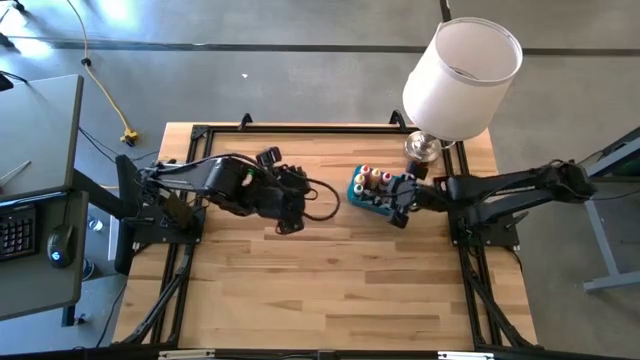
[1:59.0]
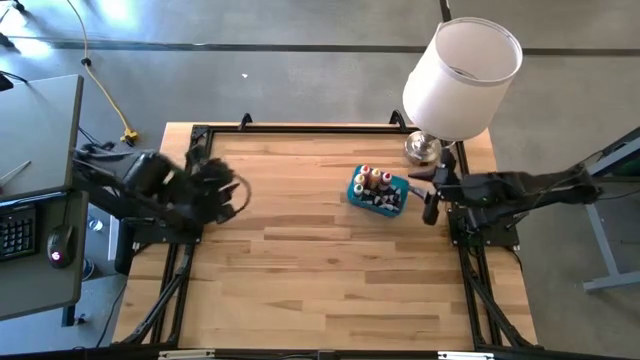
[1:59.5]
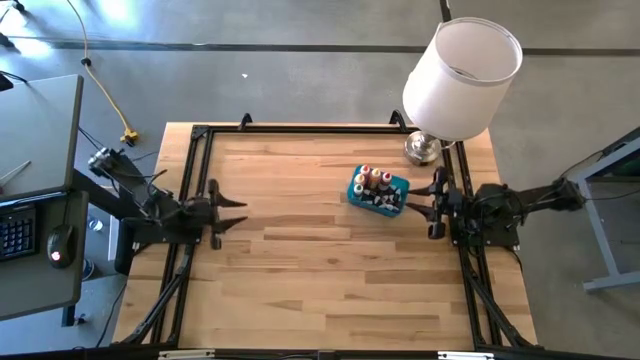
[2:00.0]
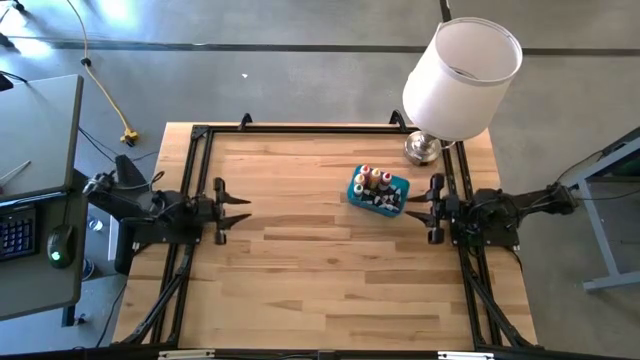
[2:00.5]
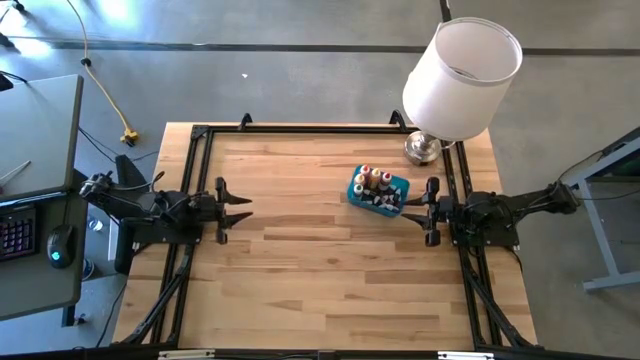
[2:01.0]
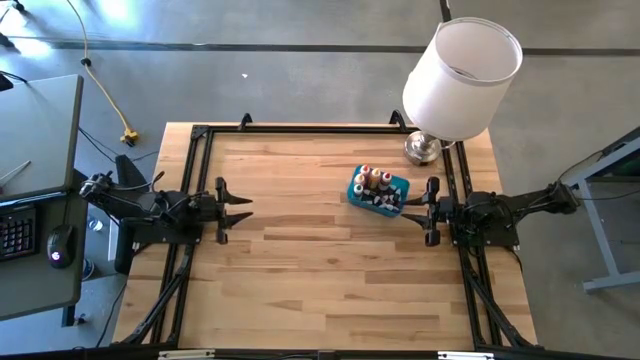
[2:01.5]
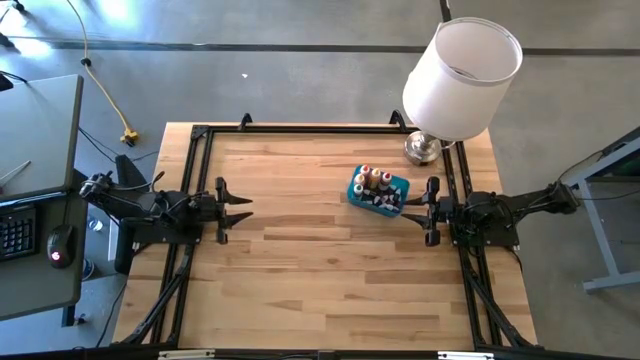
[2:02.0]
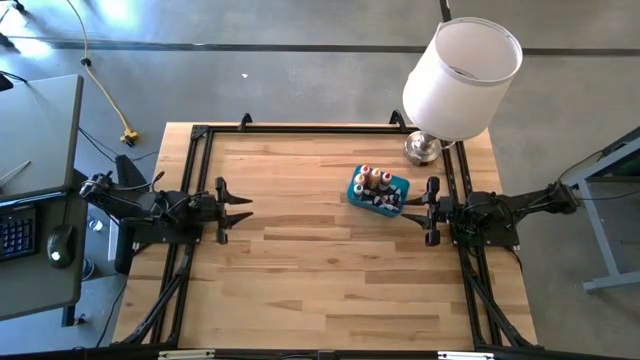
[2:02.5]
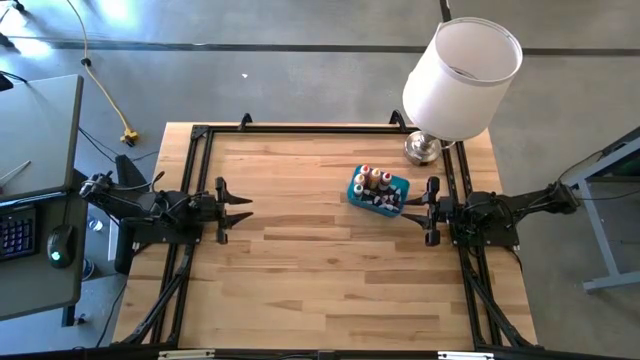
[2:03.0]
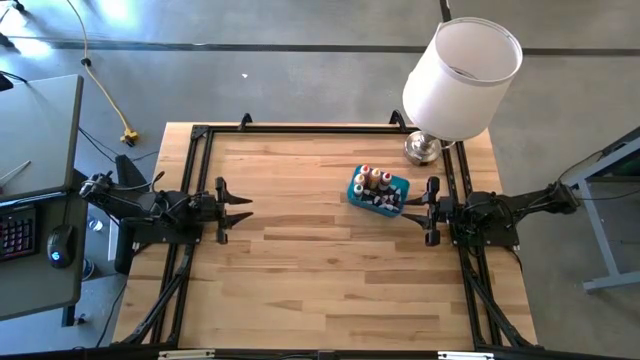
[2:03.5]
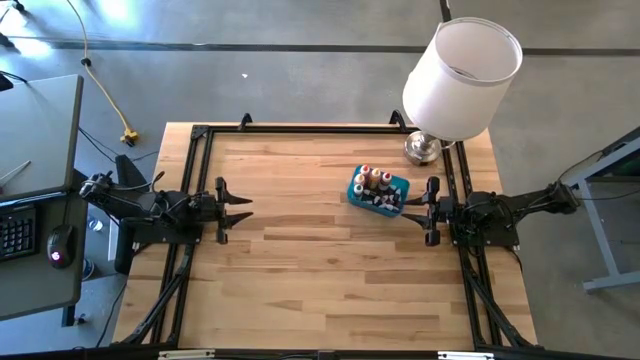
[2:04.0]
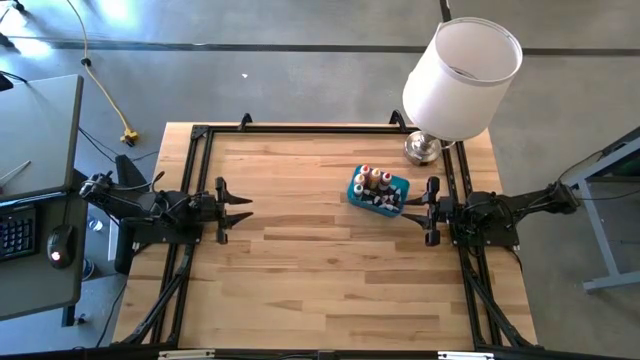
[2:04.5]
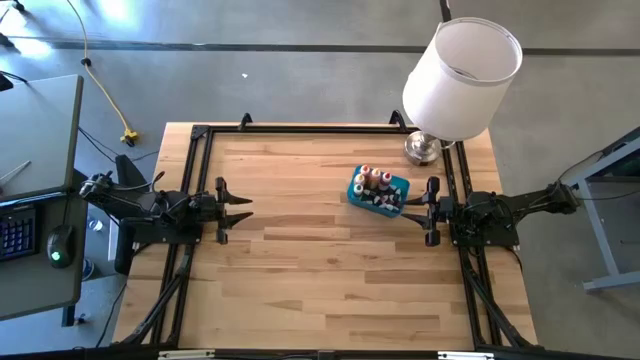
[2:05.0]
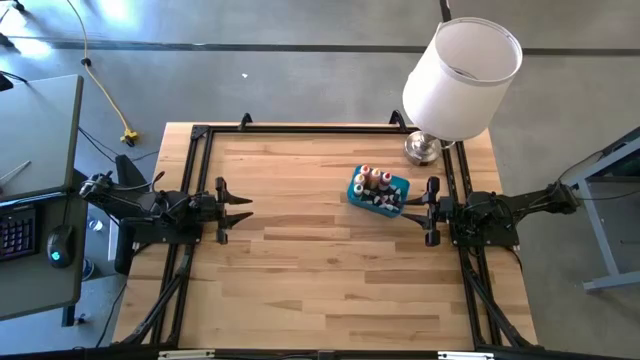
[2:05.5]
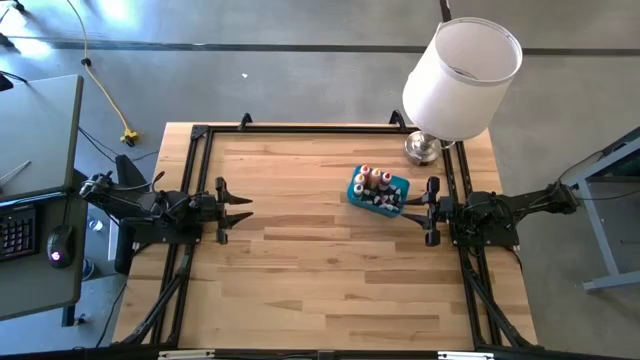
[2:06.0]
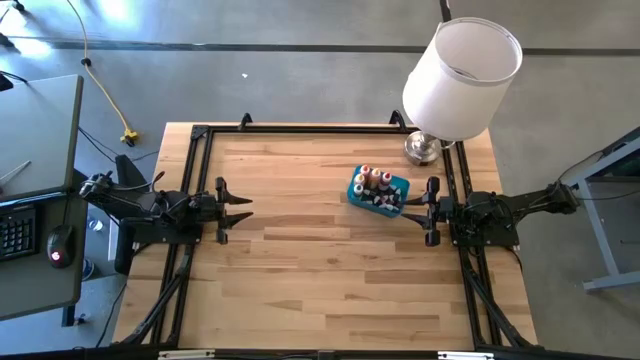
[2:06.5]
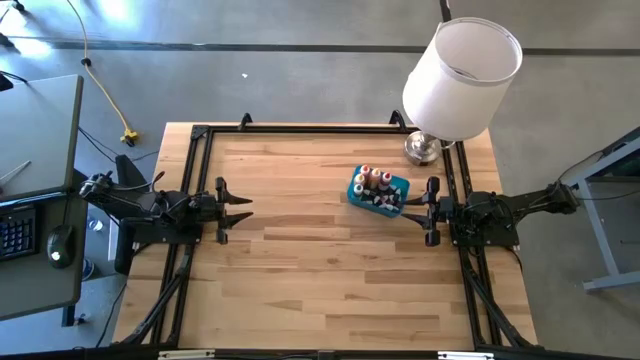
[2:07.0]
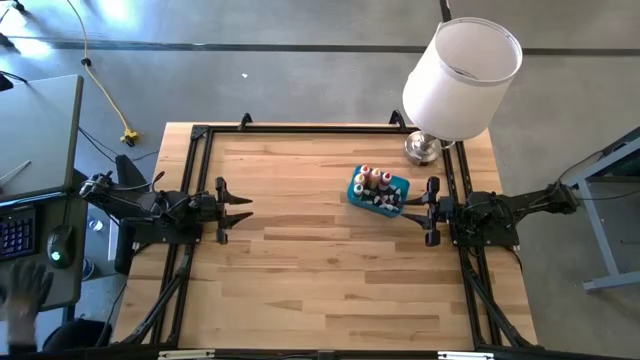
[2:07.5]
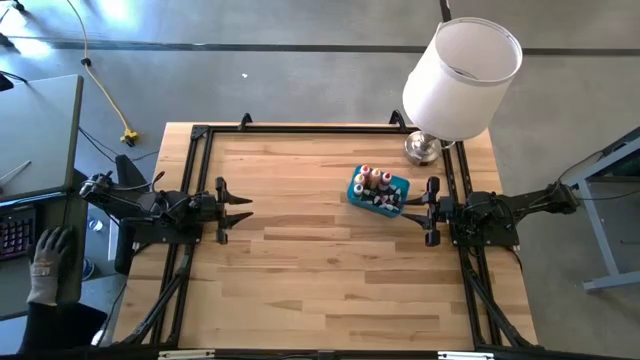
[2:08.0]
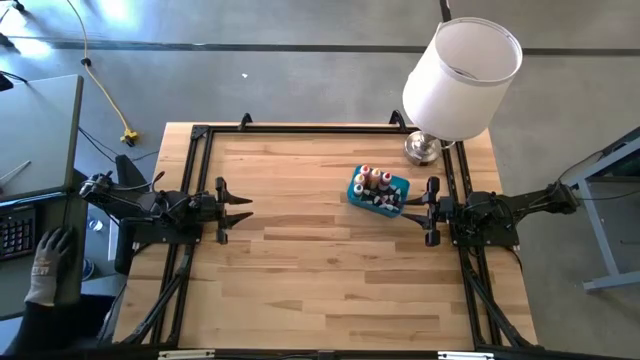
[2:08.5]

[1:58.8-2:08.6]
Task: Pick & Place food coloring
Return to Home Position

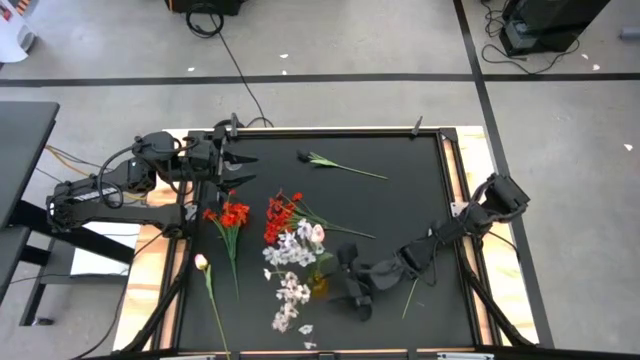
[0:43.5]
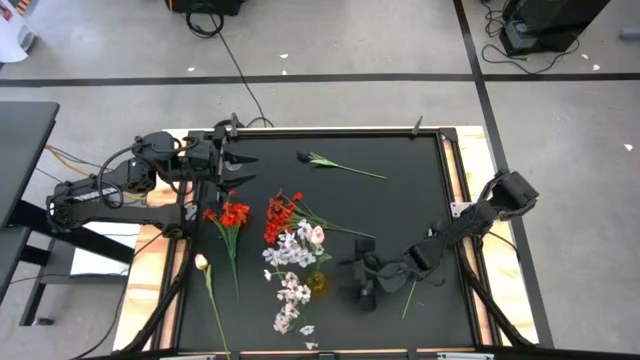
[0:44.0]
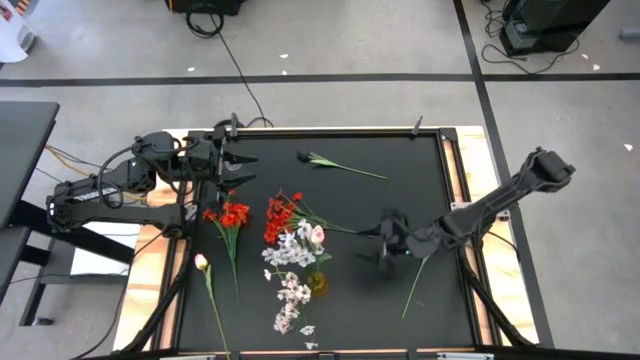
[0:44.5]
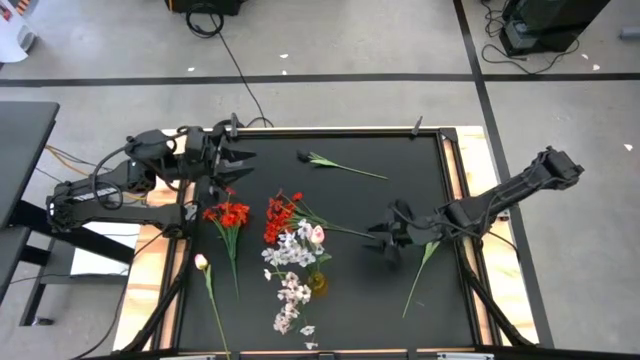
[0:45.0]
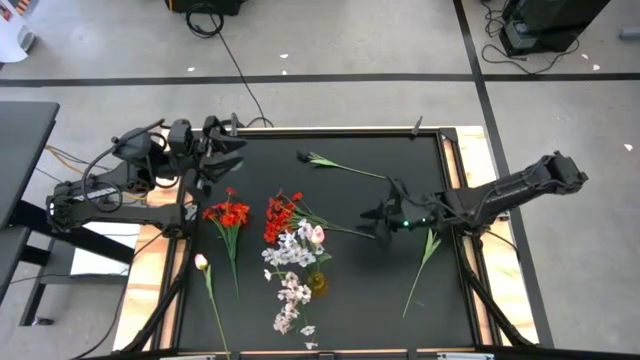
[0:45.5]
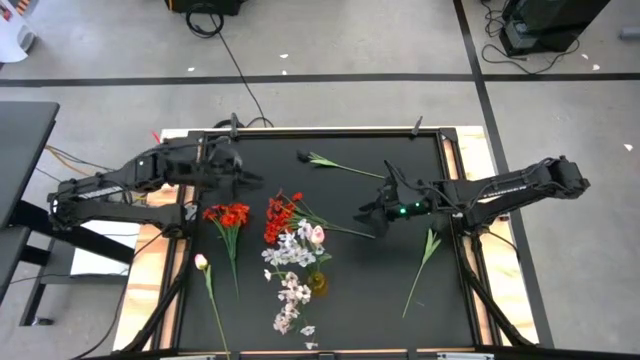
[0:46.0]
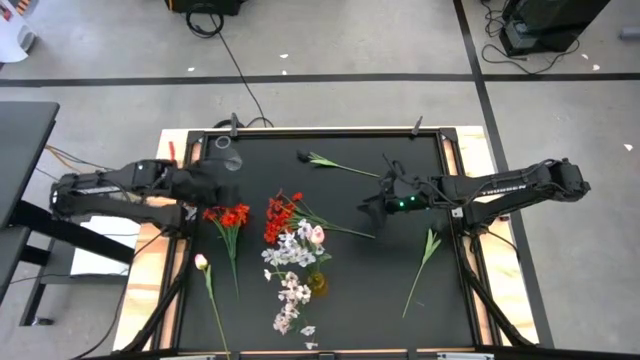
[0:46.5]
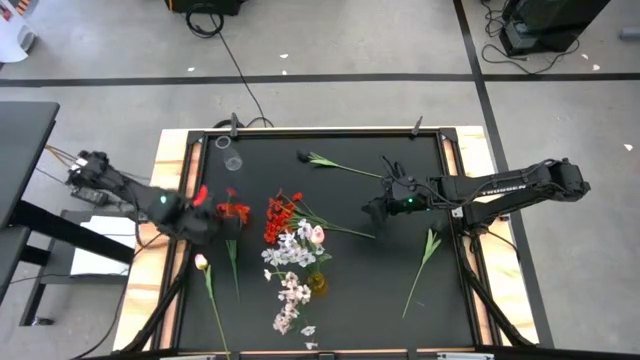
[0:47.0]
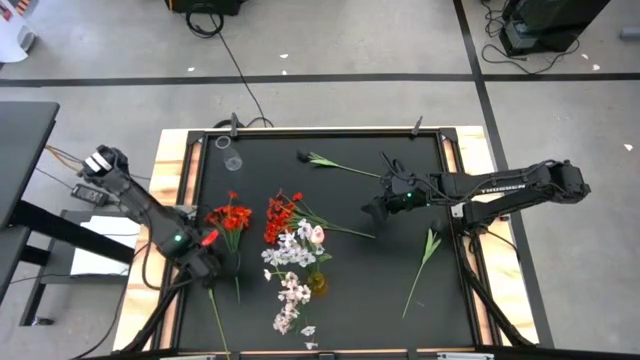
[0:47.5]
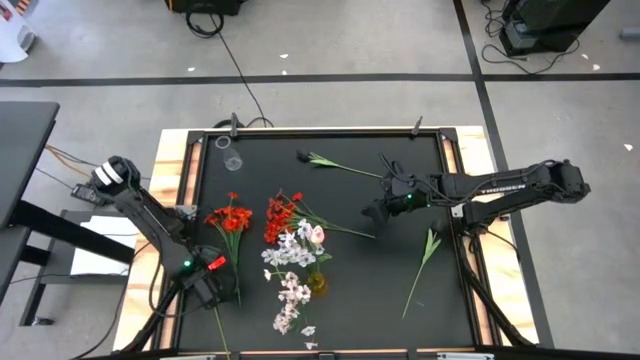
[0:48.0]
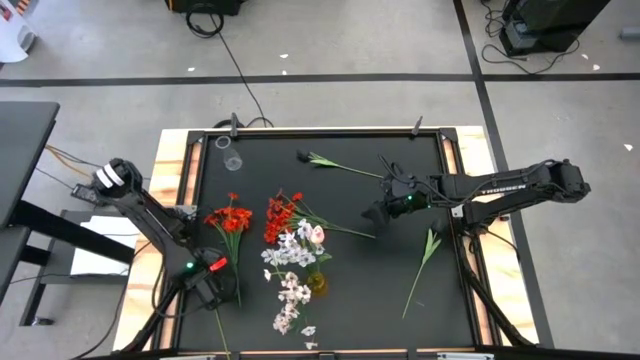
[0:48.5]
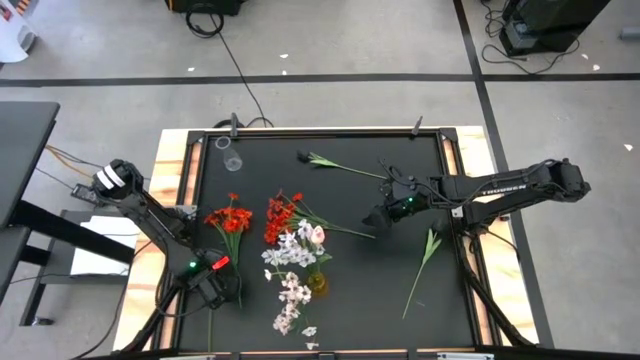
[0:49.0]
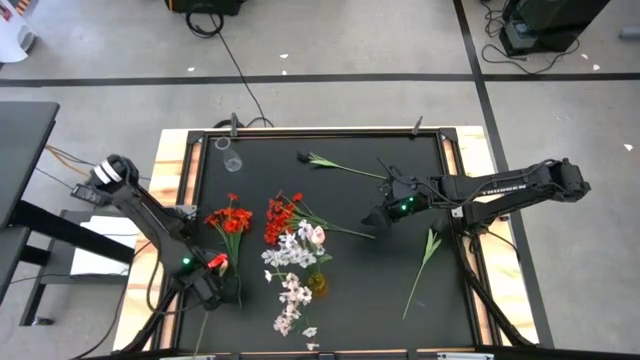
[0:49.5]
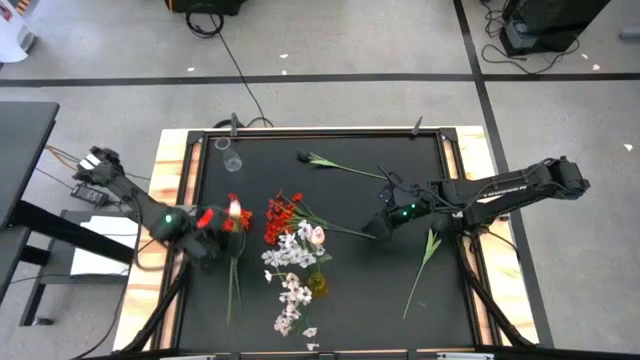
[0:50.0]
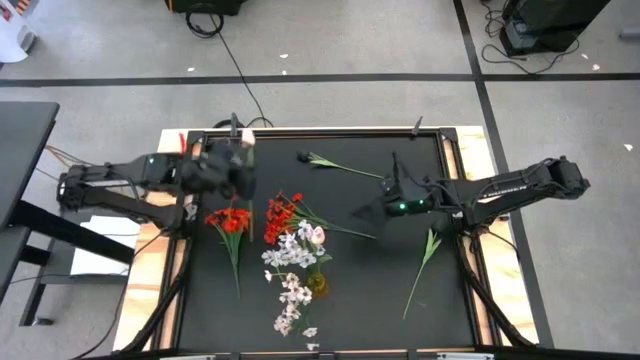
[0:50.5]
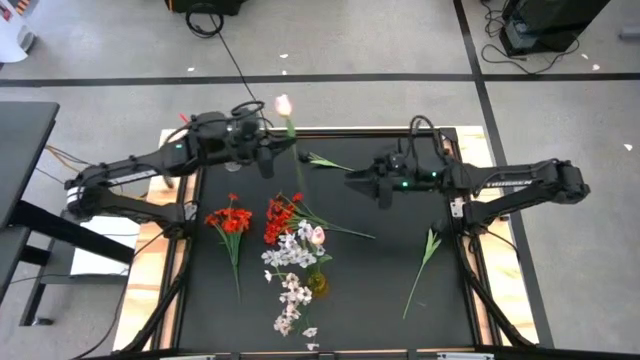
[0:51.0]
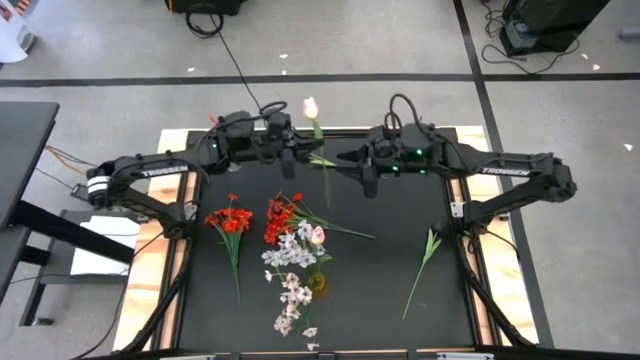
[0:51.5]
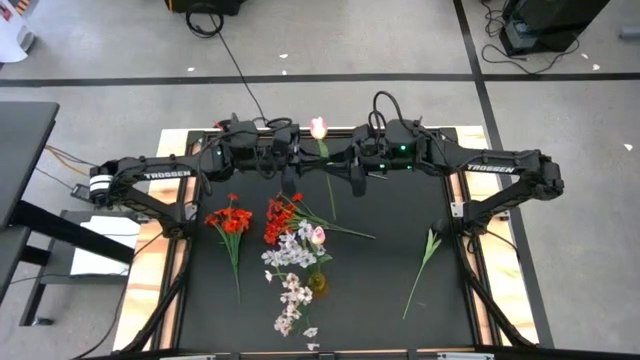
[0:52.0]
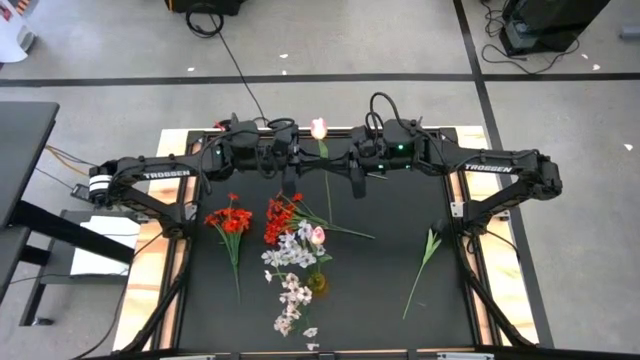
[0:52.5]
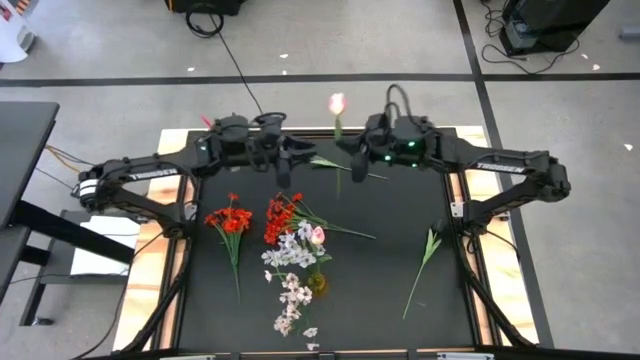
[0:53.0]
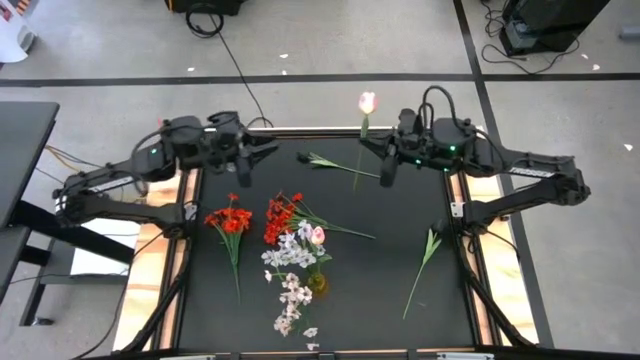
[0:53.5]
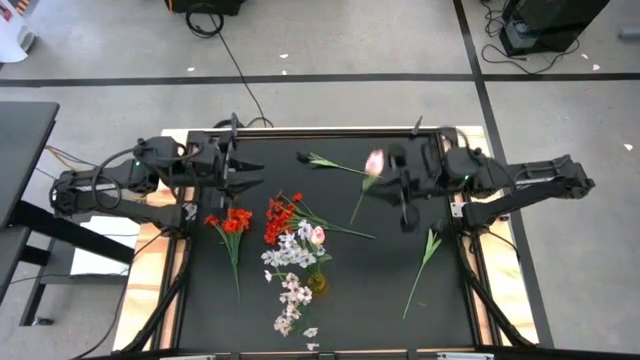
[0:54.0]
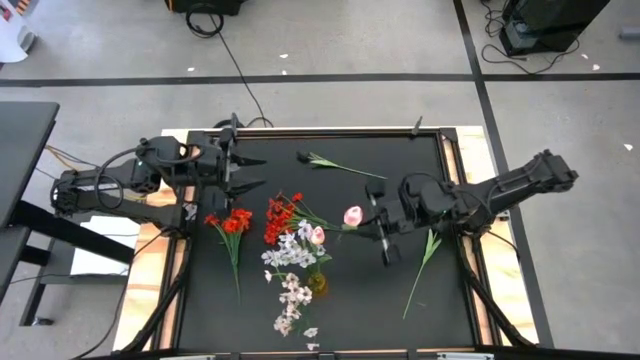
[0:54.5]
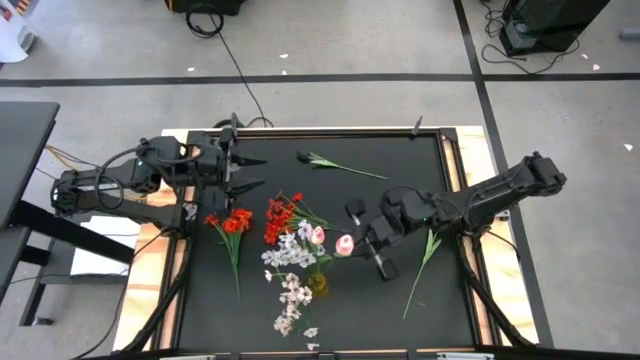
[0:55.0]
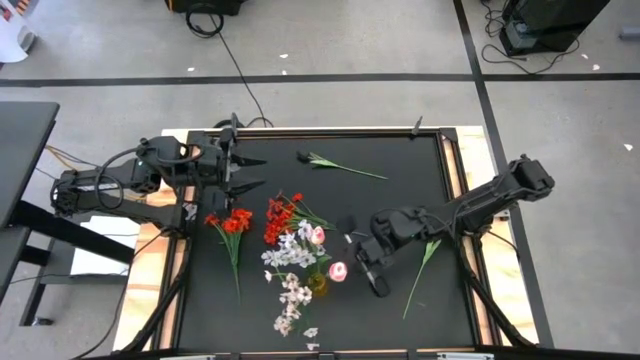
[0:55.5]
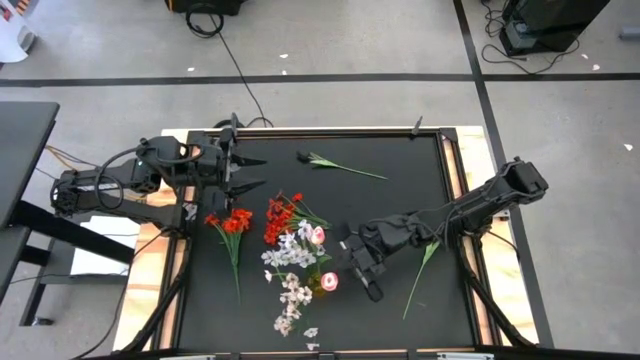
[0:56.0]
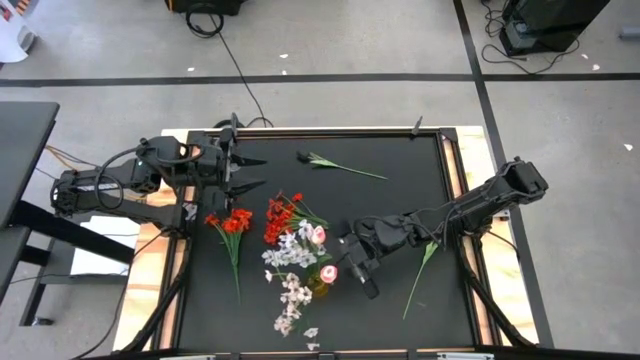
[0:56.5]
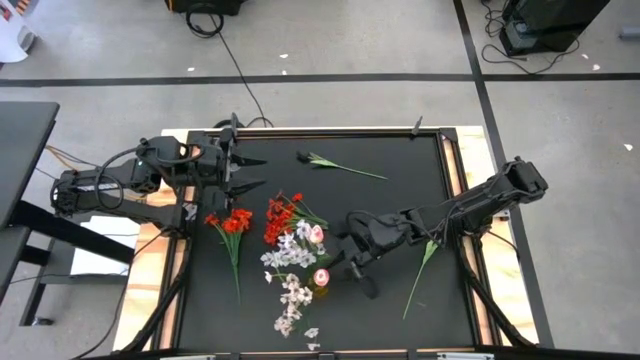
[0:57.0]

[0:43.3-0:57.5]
Task: Sort flowers into vase by color
Put the pink flower into the yellow vase
